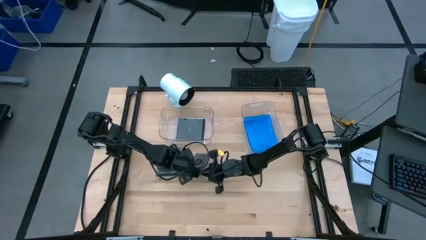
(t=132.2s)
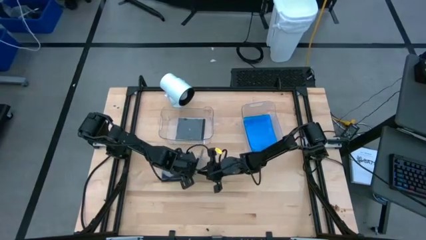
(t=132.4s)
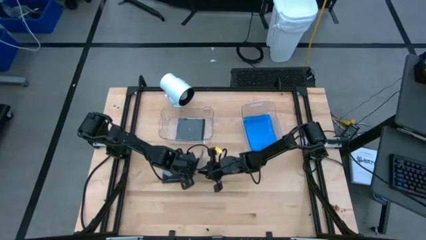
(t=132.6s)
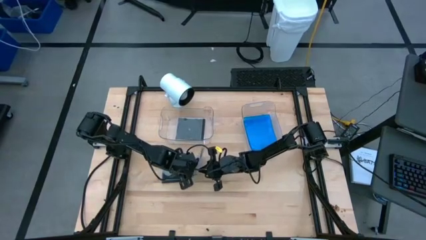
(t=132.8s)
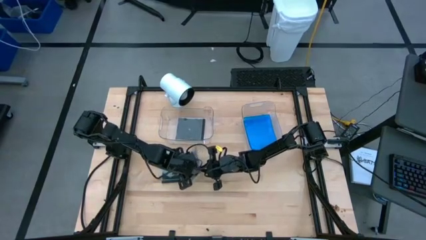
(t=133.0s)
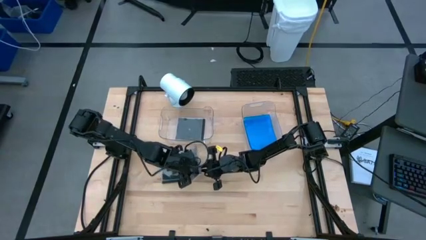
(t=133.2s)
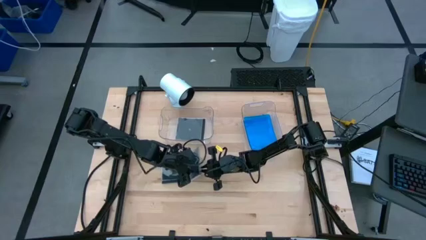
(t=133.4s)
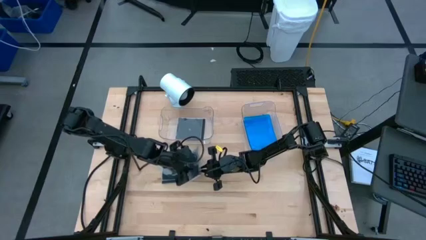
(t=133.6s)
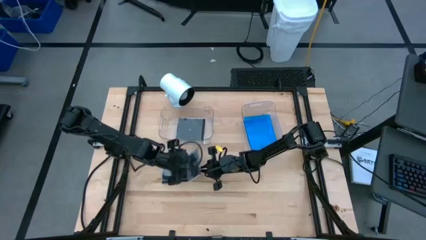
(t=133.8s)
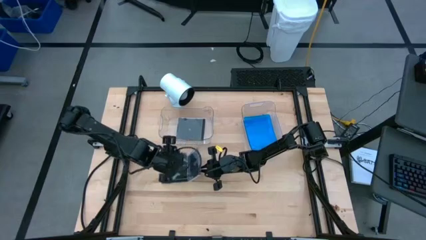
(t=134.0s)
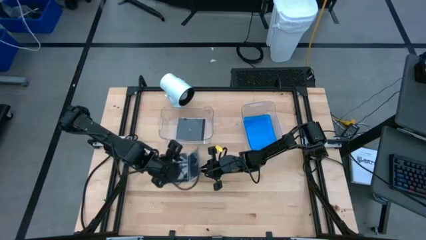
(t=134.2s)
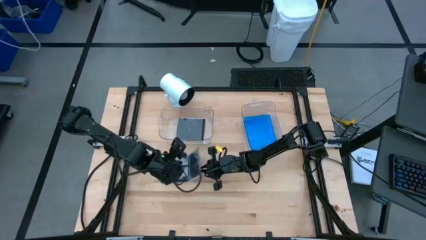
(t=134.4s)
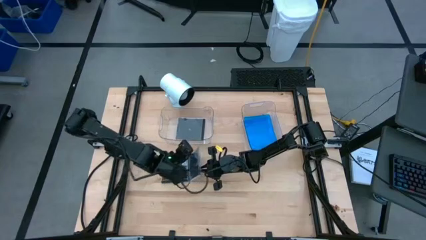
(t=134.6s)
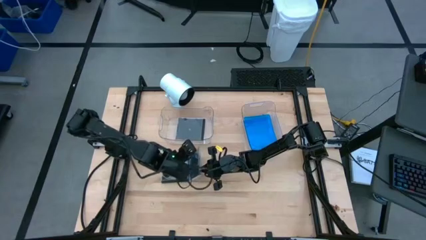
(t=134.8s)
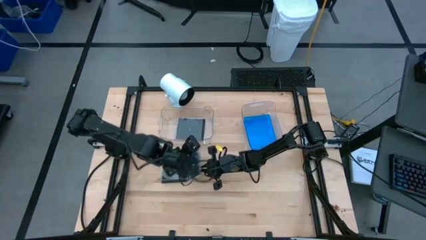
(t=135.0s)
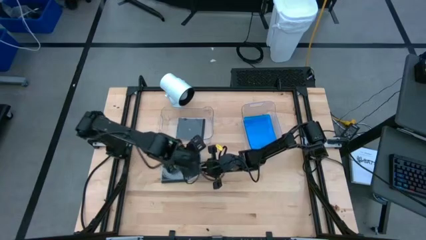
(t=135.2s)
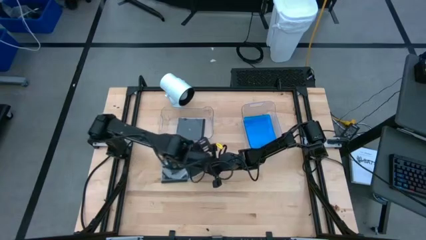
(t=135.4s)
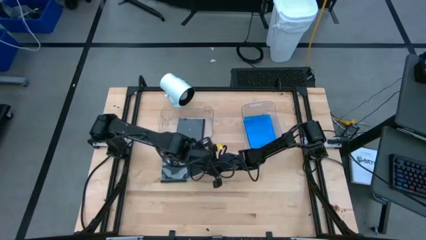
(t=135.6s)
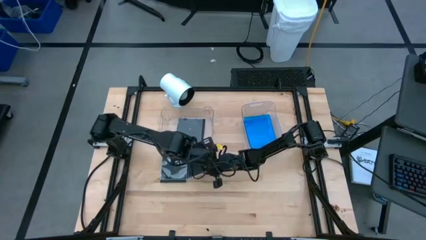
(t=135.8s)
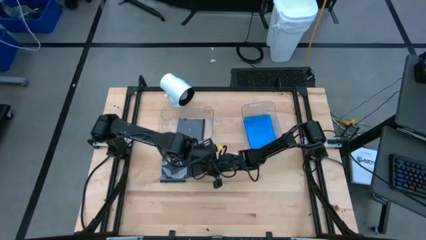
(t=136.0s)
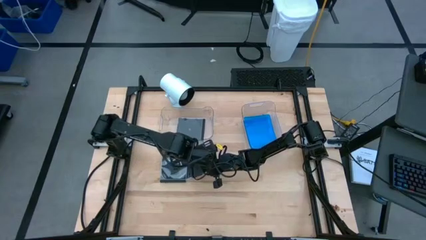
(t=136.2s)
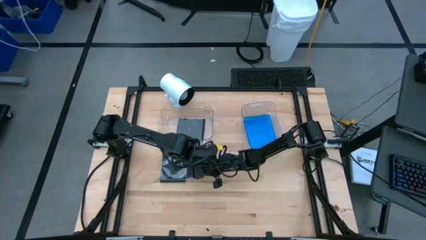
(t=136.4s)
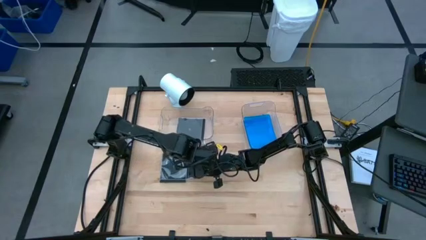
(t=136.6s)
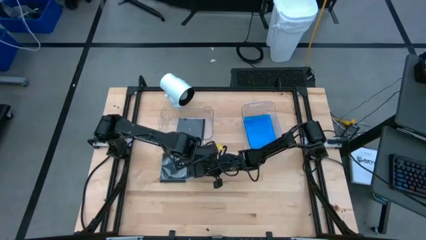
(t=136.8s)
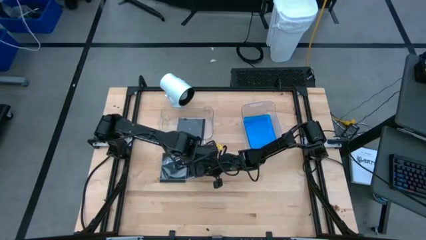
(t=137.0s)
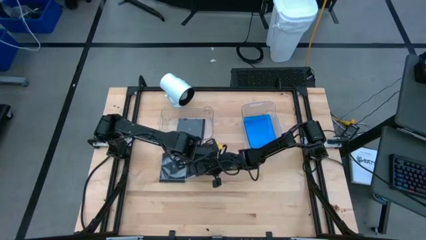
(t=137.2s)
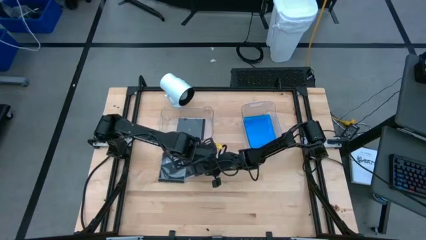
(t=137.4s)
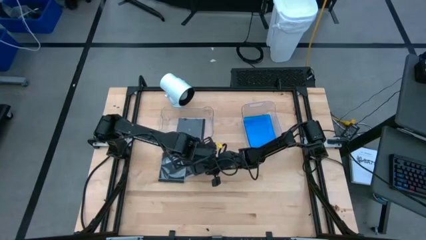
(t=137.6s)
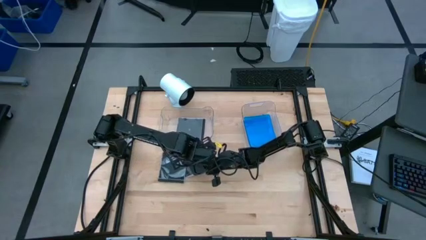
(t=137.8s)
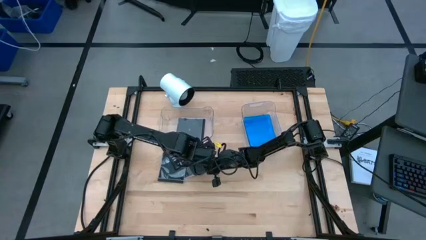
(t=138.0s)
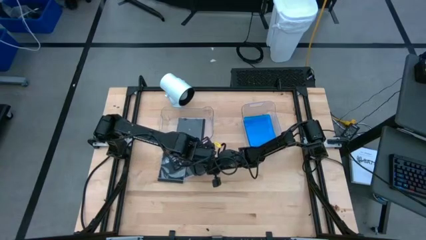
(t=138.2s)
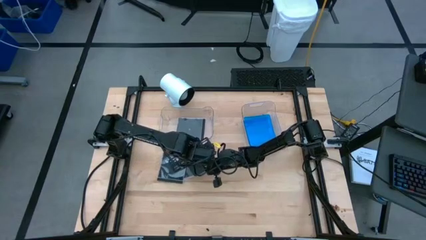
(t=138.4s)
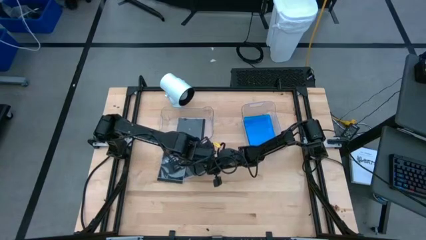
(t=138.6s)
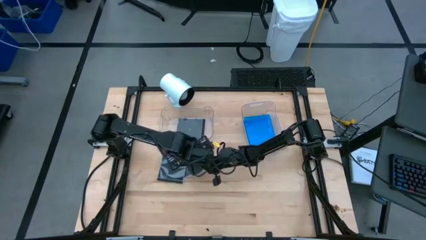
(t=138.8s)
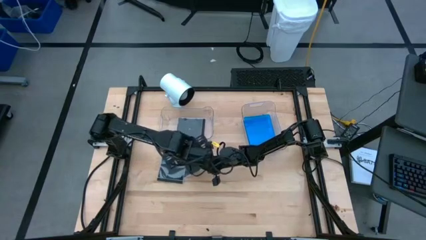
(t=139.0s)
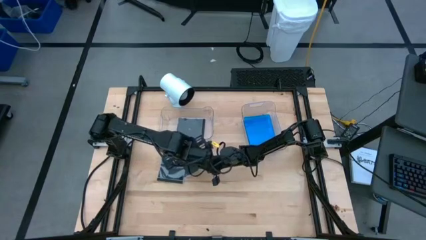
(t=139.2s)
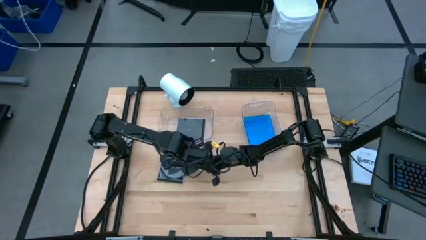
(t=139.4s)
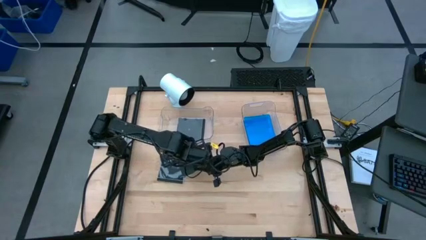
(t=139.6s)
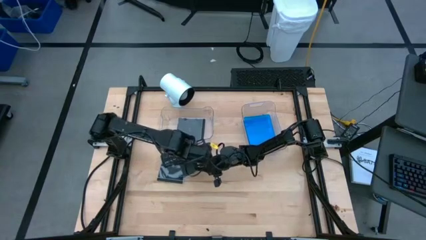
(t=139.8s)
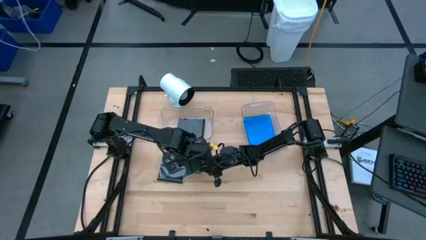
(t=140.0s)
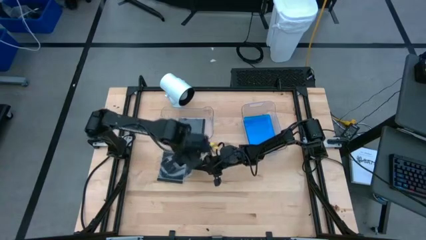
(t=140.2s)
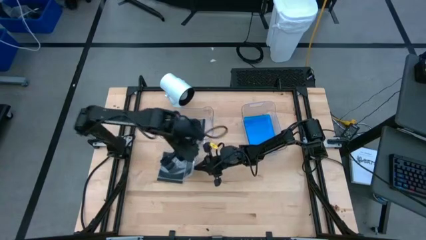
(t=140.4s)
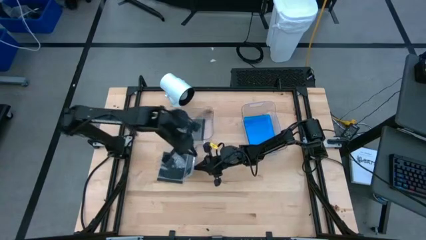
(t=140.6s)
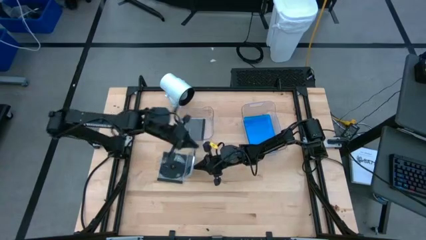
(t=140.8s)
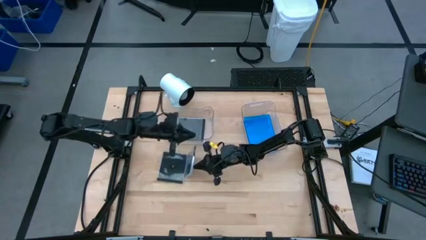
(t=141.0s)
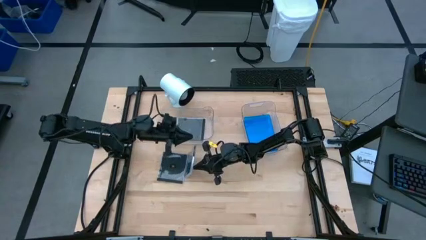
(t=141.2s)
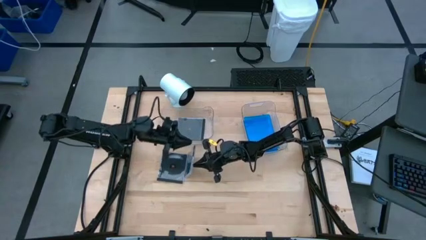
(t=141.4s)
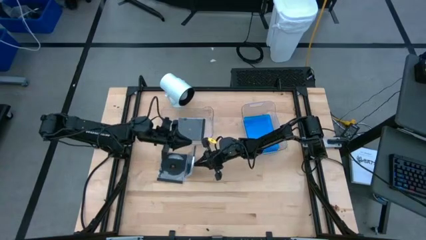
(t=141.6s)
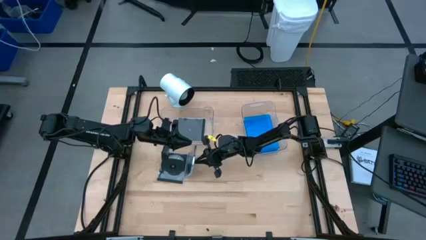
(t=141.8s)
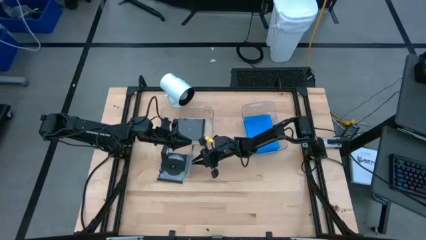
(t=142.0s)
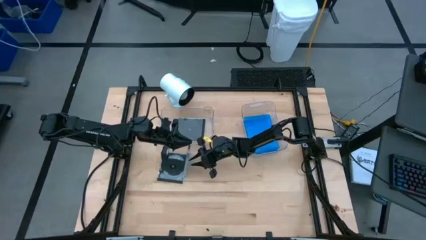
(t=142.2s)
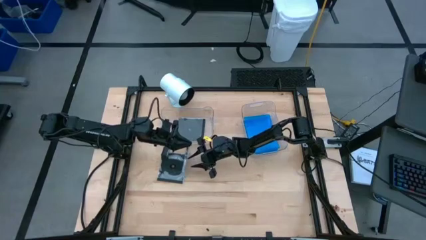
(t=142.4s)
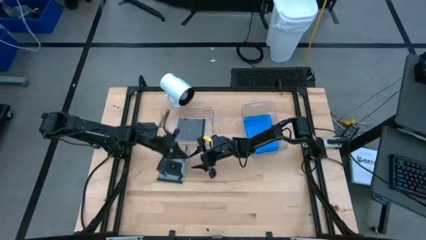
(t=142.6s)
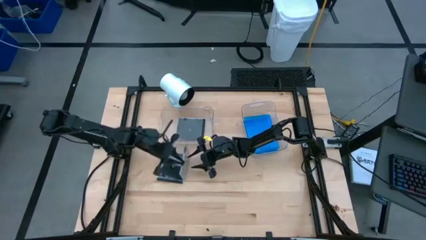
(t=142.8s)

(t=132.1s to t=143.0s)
Task: Pick & place jewel cases by type
Put the bottom black cd case into the left transparent bin
